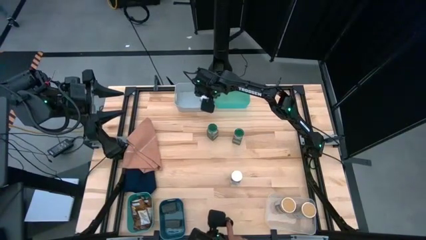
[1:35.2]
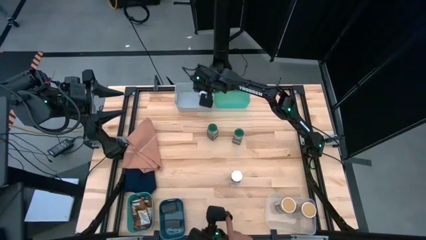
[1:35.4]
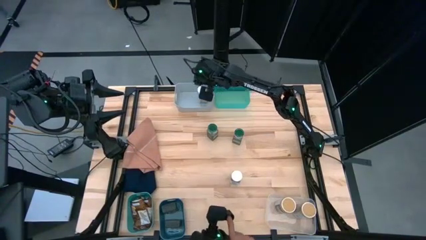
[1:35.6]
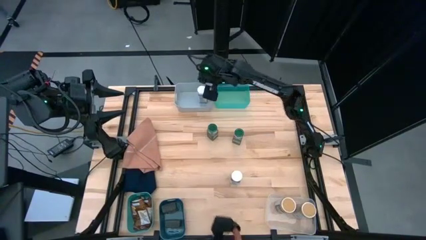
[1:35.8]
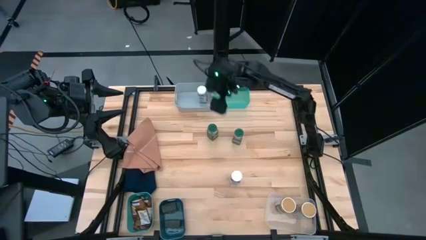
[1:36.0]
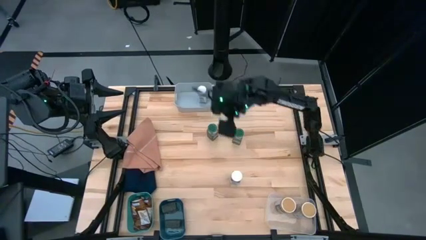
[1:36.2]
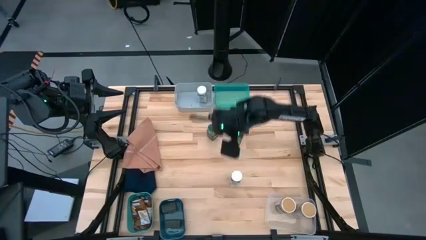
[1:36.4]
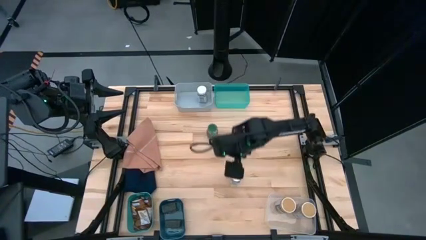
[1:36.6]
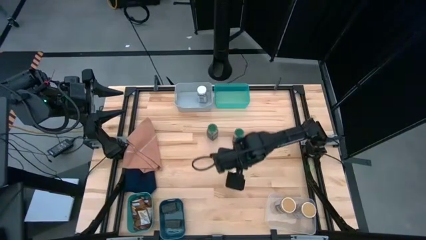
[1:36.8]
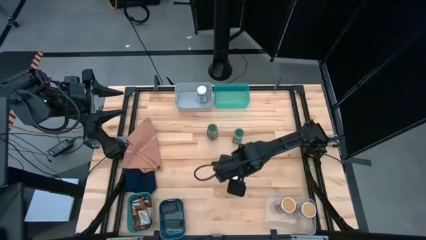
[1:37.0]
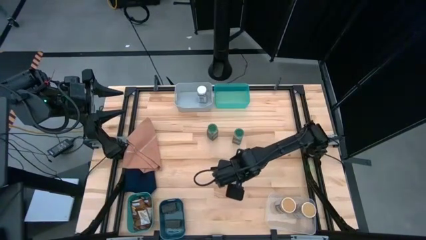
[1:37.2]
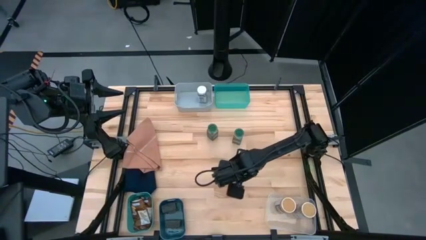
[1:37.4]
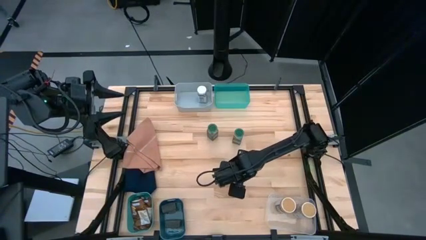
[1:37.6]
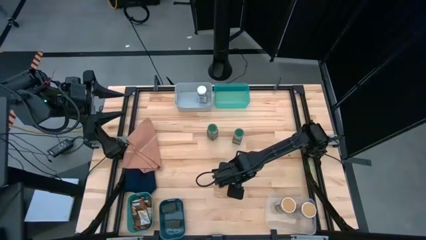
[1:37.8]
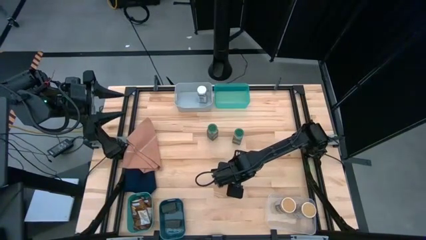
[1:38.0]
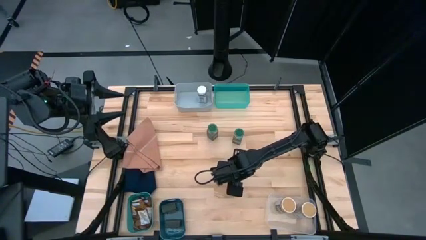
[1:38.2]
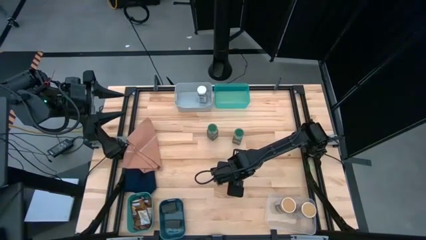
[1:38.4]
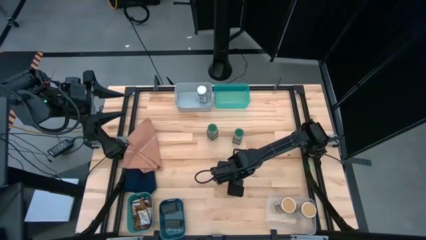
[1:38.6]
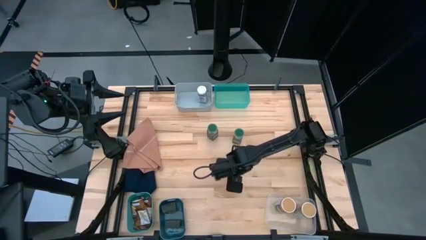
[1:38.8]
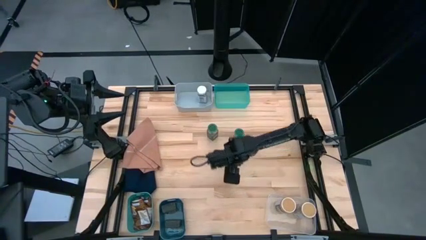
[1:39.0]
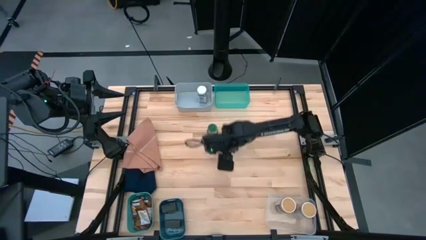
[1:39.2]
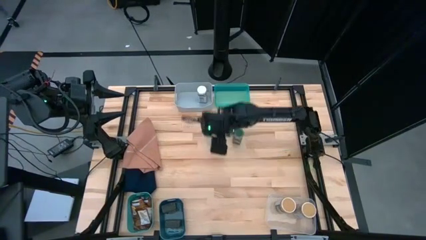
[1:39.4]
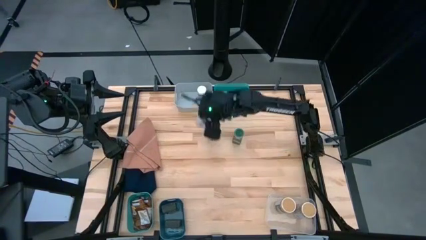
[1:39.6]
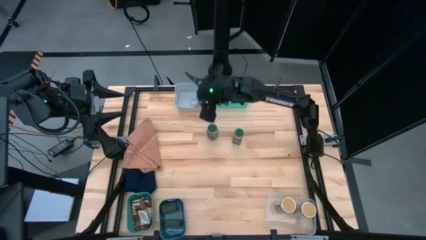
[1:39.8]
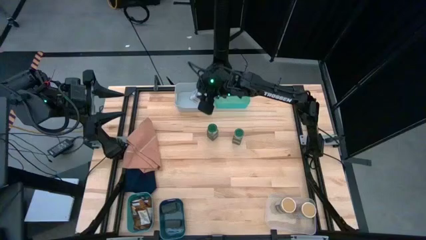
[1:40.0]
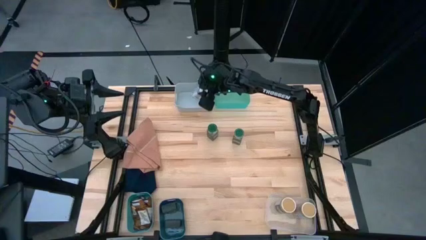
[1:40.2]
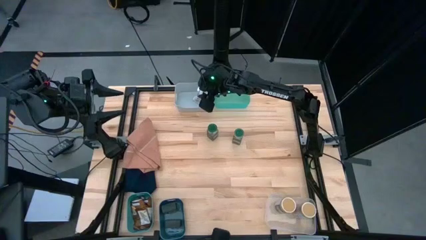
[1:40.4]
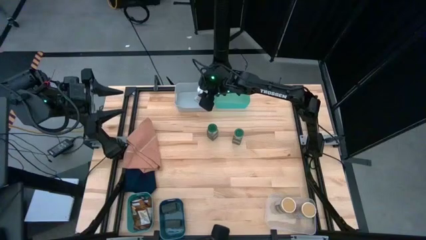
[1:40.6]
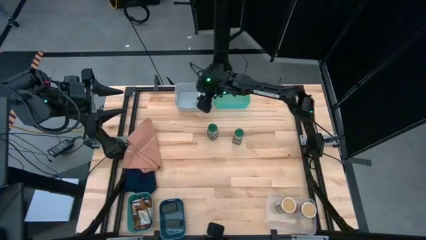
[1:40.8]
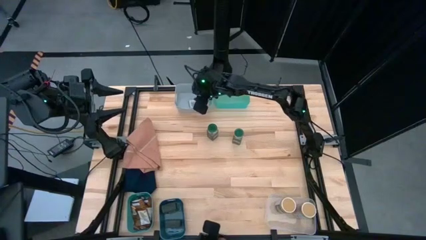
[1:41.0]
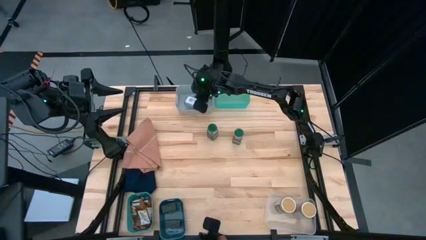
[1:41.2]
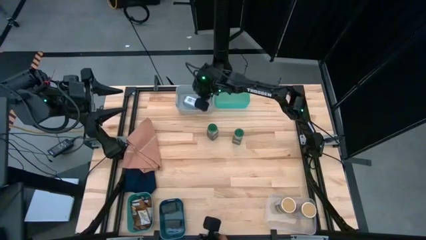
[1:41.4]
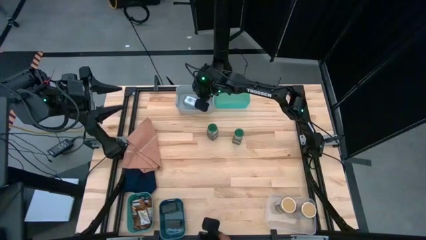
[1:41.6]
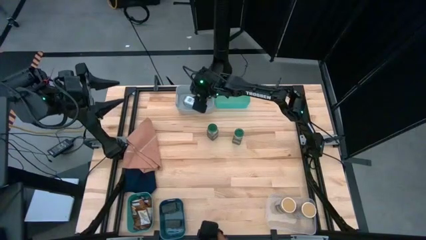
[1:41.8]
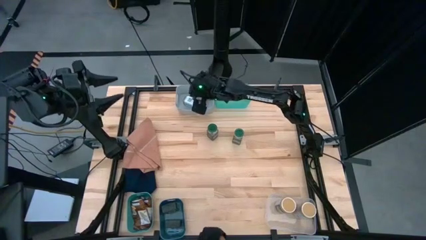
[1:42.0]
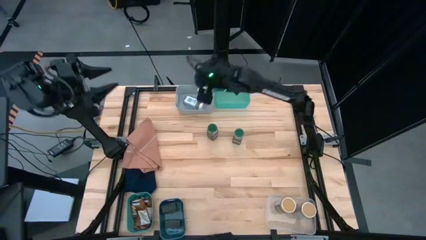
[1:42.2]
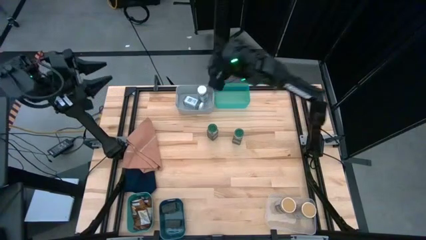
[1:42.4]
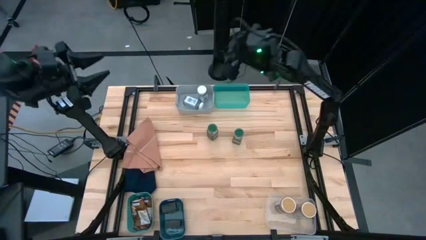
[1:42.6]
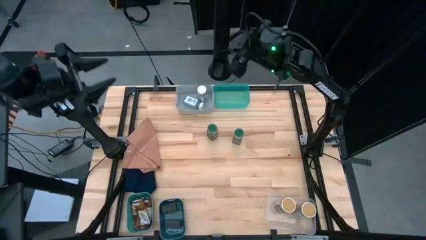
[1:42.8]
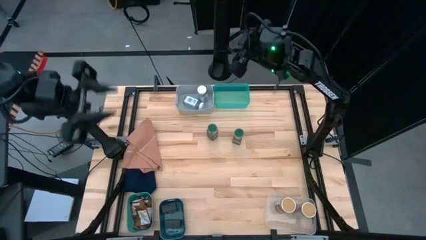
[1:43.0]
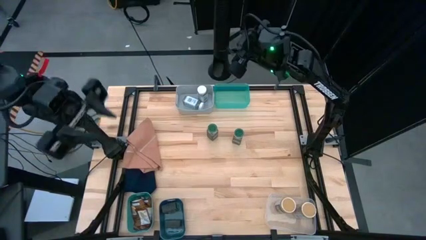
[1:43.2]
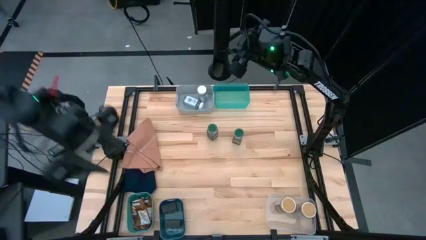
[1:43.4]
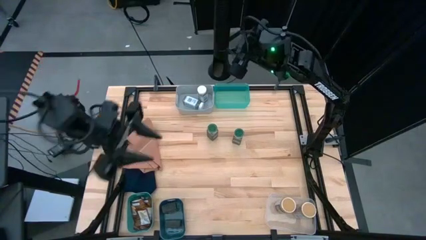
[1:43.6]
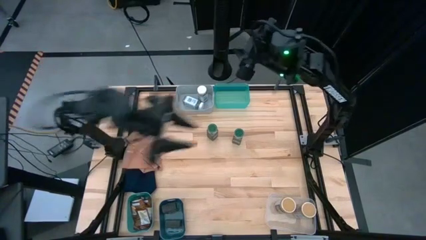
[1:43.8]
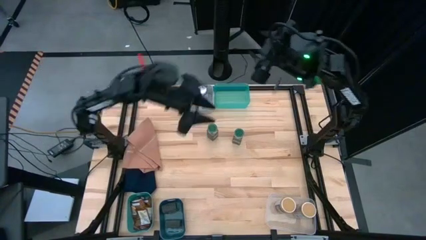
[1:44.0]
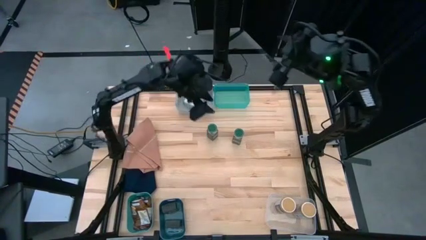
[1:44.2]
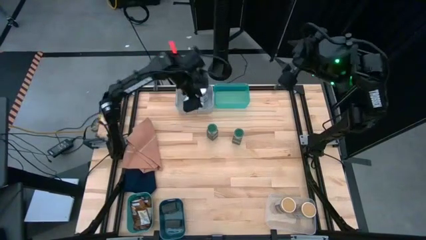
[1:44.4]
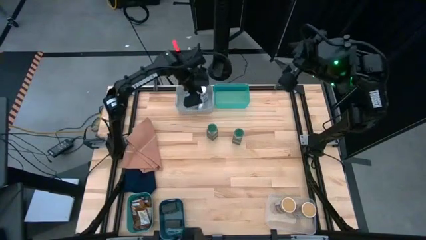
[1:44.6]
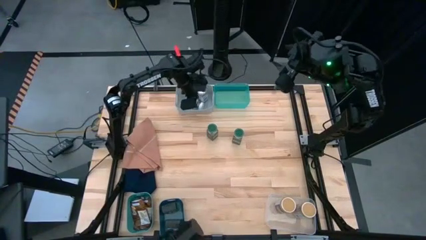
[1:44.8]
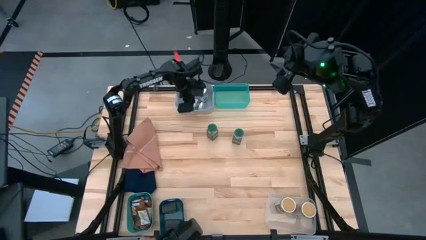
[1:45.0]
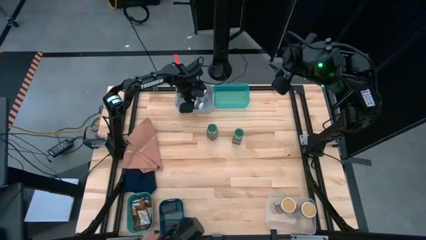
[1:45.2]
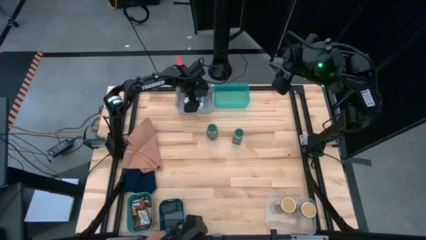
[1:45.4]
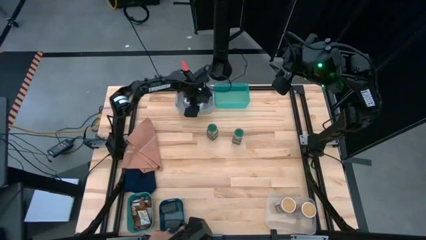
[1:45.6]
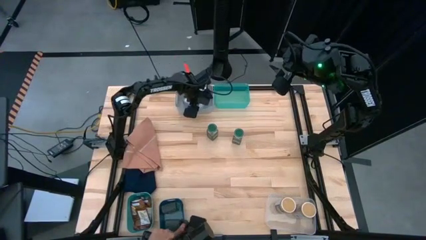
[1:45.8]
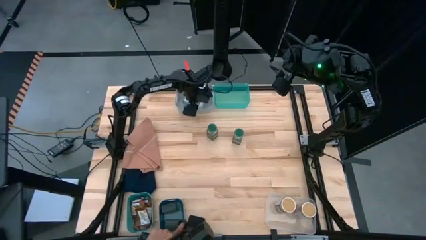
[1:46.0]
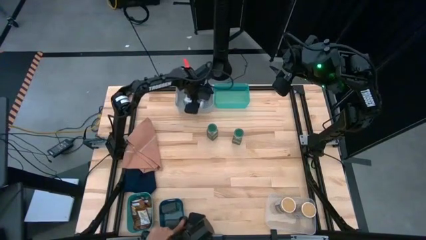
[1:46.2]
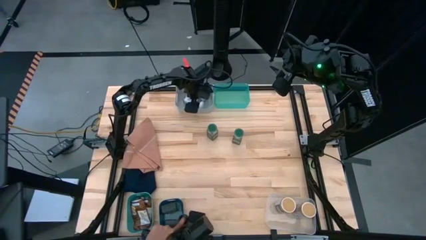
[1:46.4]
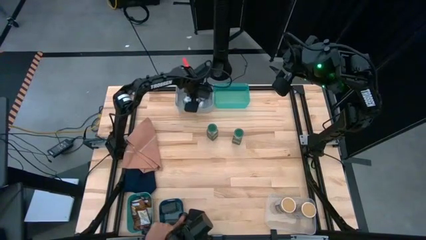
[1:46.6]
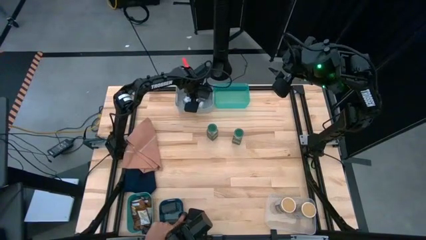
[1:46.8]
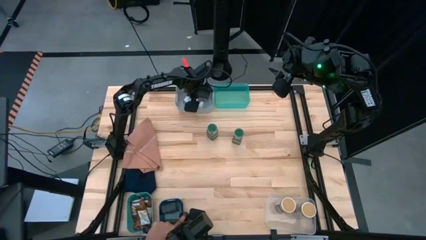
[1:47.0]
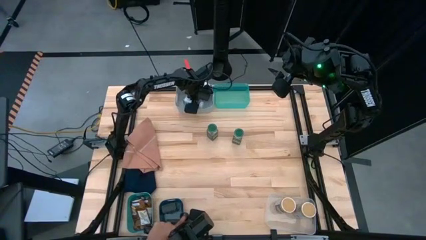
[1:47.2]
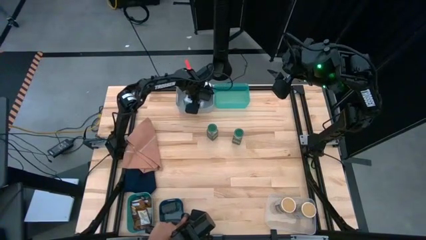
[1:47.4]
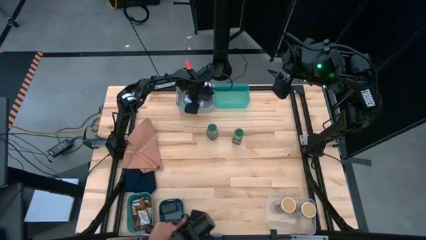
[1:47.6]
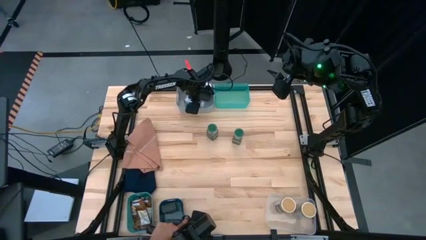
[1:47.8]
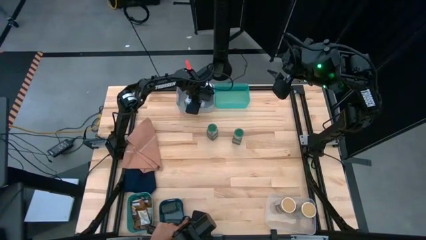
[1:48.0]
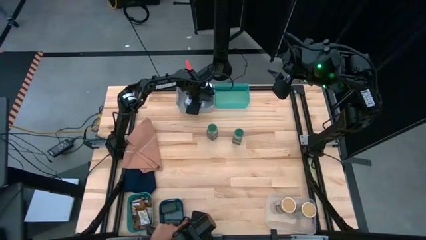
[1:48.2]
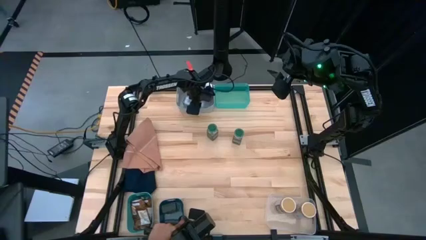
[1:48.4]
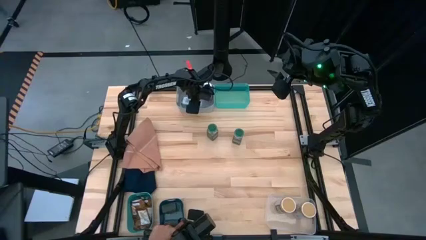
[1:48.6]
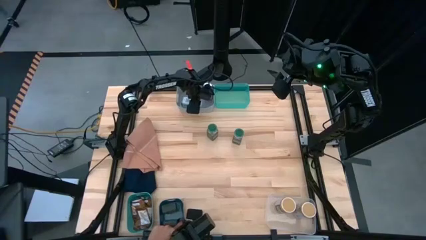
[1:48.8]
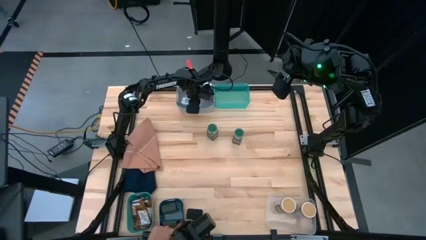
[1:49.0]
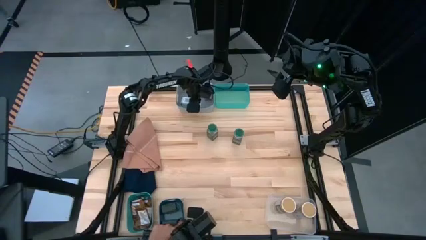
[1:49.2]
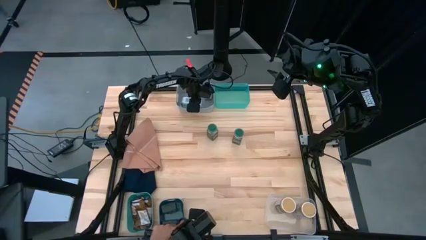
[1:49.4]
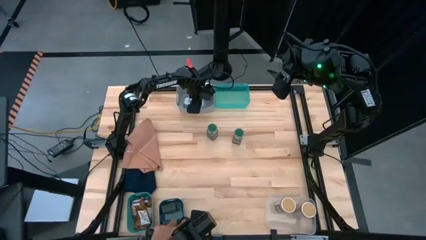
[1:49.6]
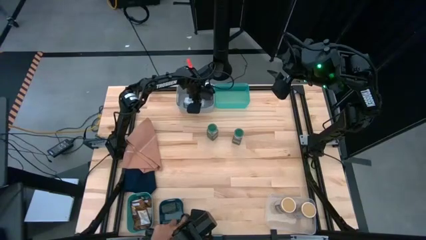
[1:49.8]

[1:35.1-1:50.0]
Task: Sort spices by type
Put the white spice bottle into the gray bin

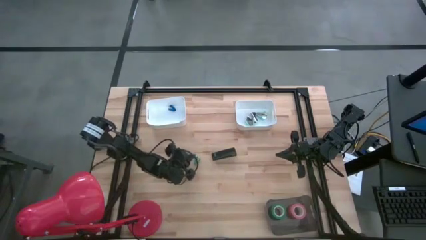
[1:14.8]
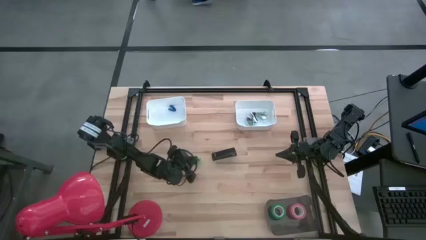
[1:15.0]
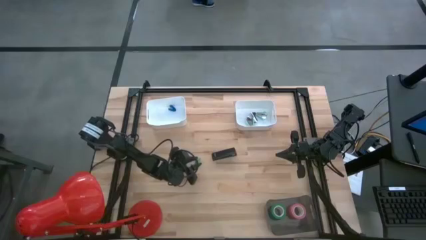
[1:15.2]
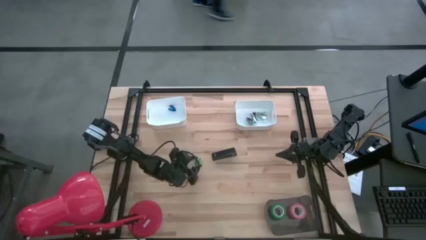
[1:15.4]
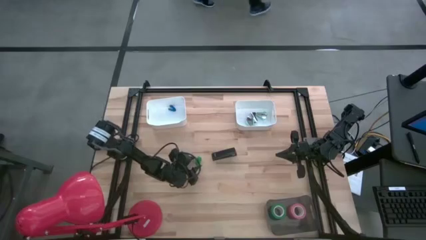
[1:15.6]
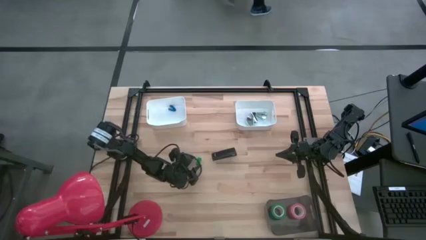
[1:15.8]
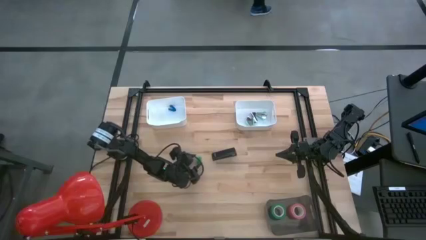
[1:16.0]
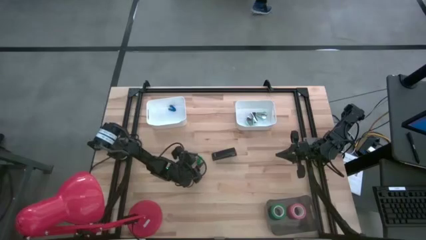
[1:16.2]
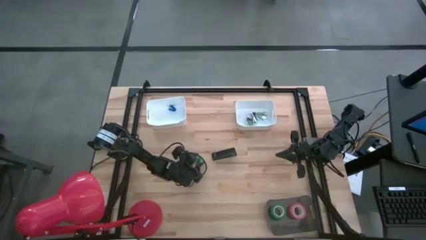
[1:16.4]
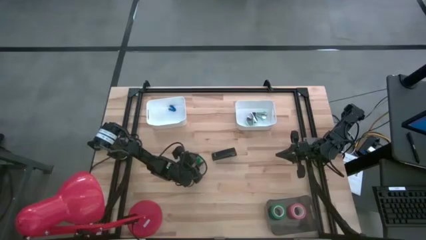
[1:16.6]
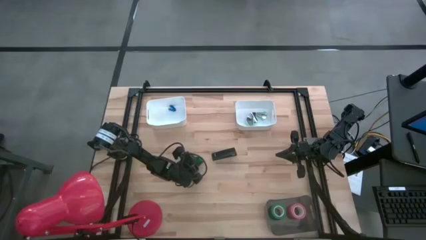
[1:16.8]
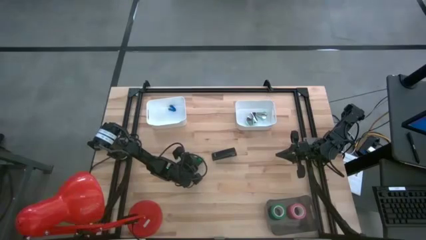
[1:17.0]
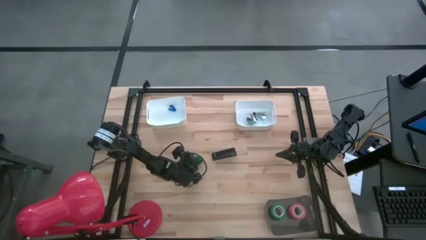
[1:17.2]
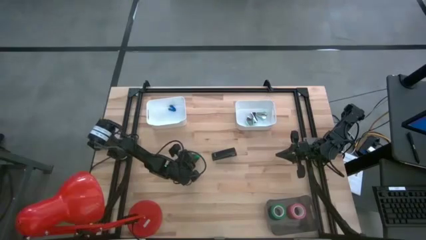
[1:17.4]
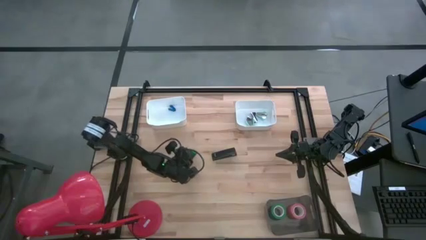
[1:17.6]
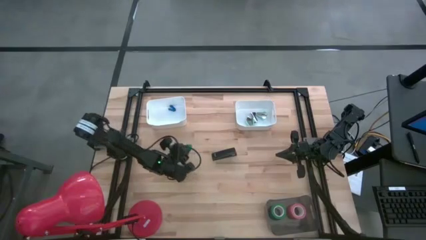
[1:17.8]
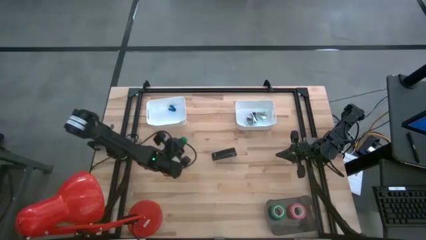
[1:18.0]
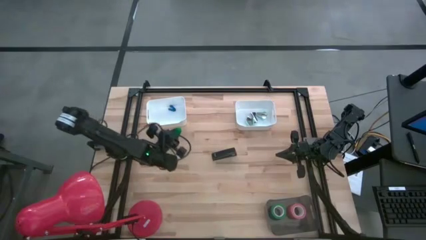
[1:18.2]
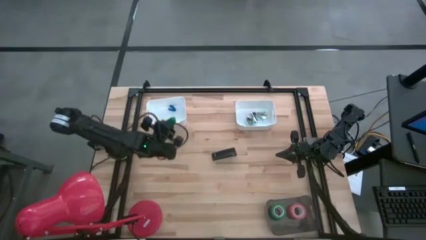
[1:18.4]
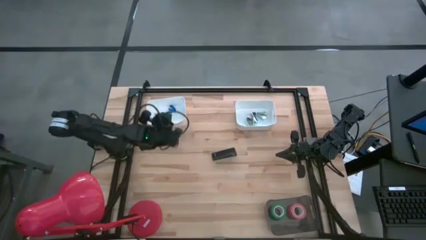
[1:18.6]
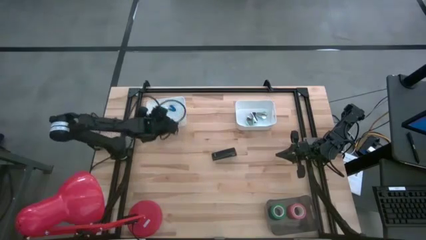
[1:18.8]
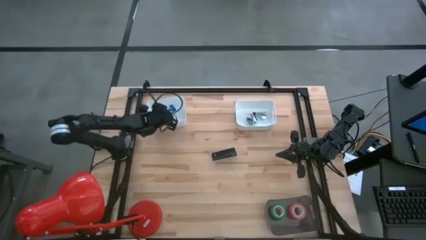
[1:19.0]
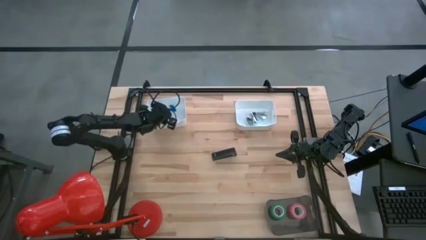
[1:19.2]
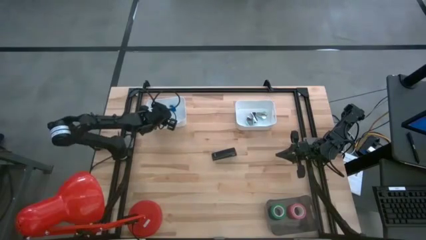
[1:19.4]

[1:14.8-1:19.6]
Task: Pick and place Stapler, Stapler remover, tape
Put the green stapler into the left white bin
